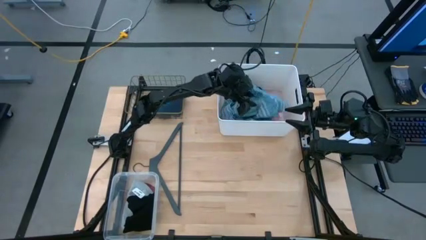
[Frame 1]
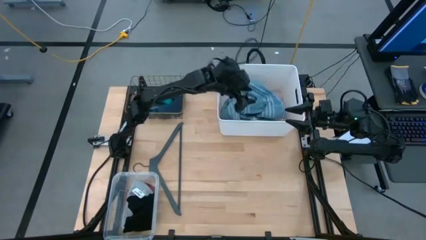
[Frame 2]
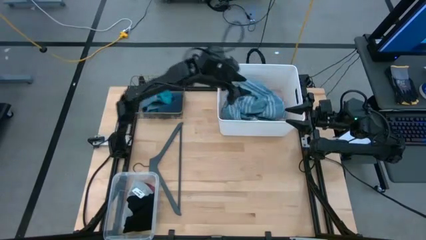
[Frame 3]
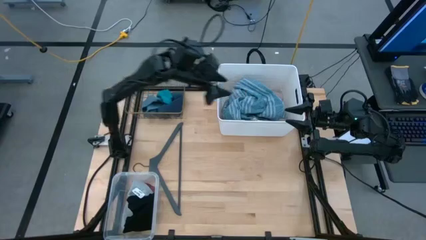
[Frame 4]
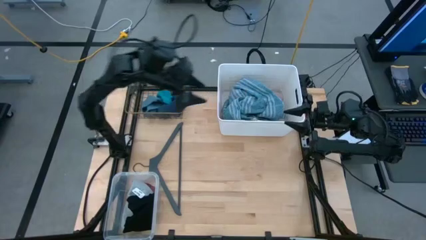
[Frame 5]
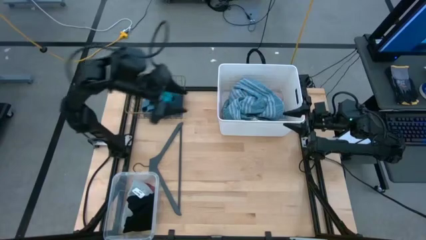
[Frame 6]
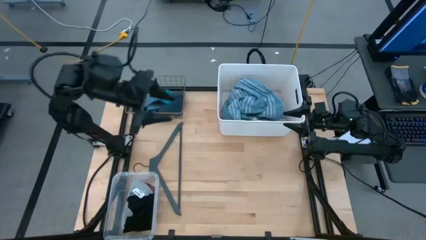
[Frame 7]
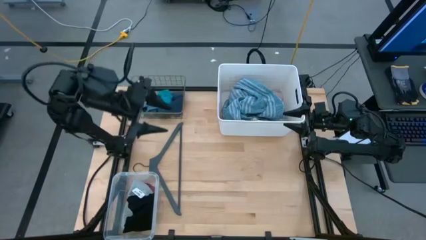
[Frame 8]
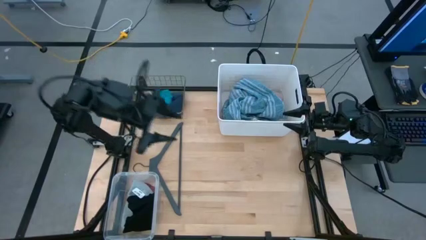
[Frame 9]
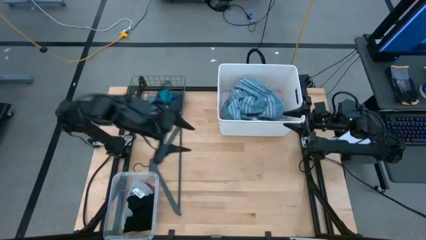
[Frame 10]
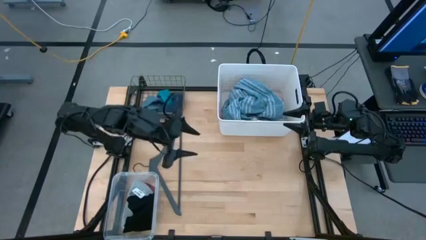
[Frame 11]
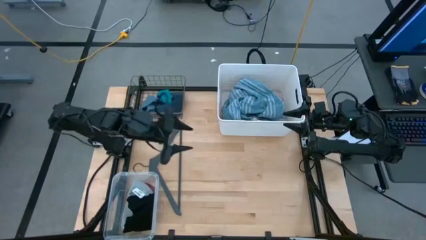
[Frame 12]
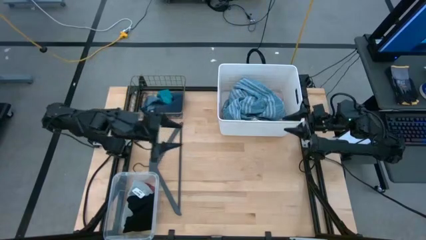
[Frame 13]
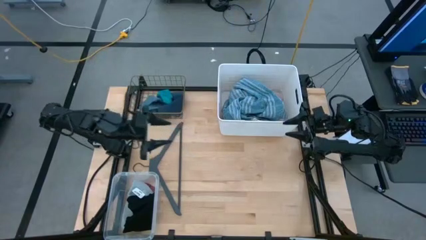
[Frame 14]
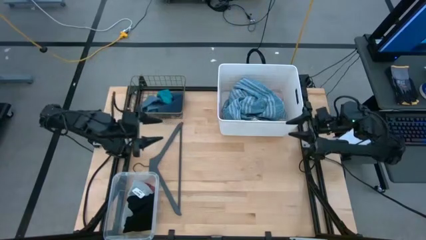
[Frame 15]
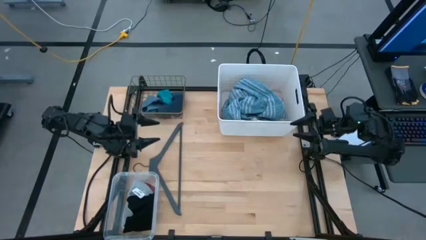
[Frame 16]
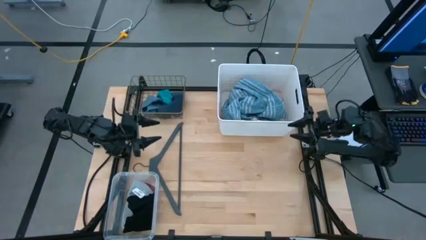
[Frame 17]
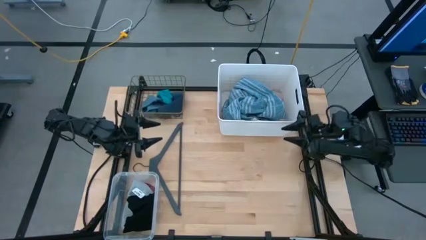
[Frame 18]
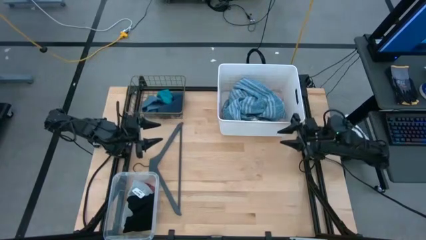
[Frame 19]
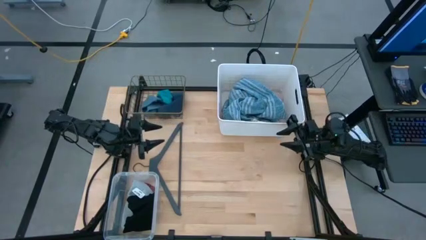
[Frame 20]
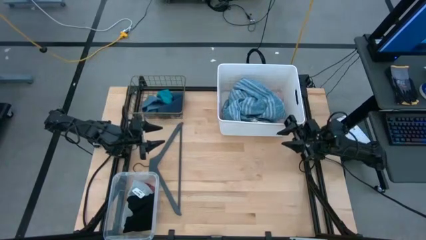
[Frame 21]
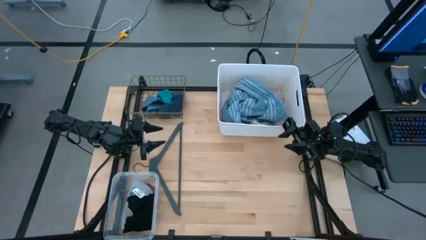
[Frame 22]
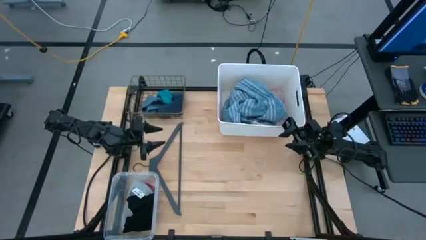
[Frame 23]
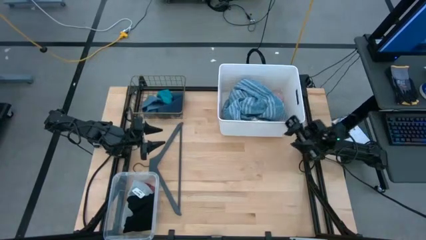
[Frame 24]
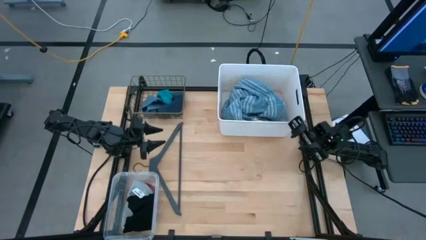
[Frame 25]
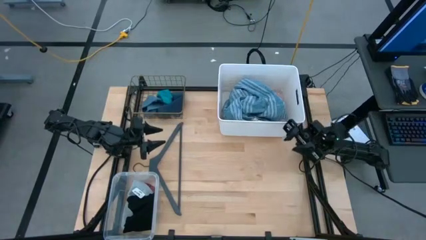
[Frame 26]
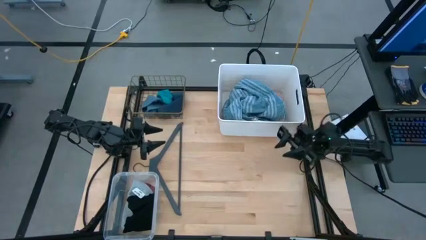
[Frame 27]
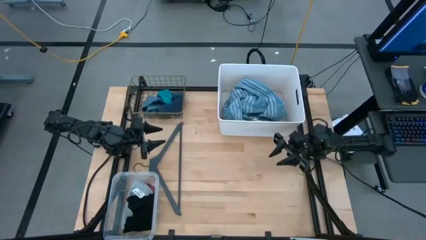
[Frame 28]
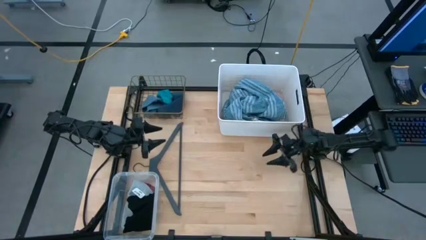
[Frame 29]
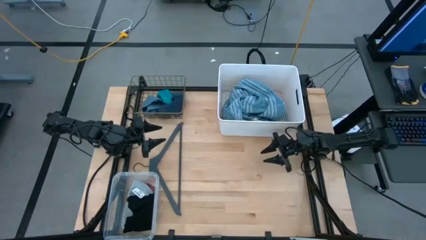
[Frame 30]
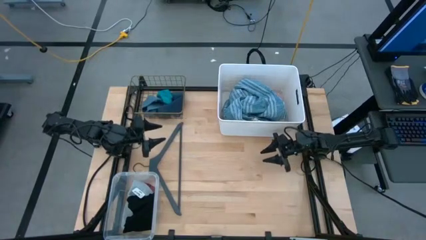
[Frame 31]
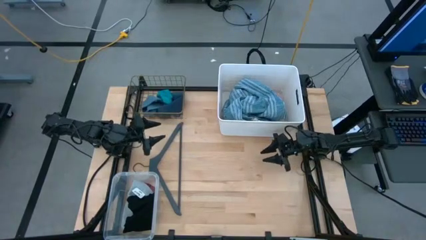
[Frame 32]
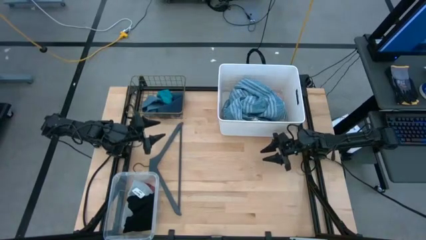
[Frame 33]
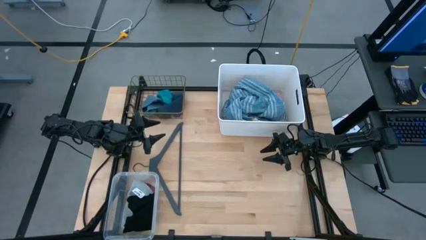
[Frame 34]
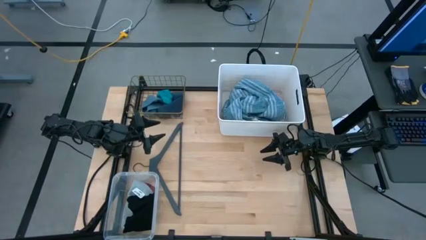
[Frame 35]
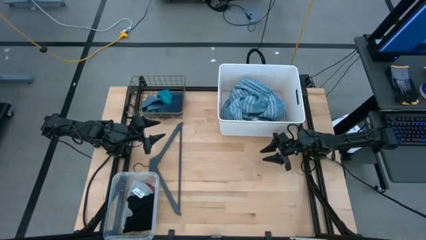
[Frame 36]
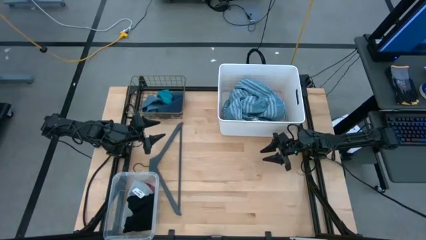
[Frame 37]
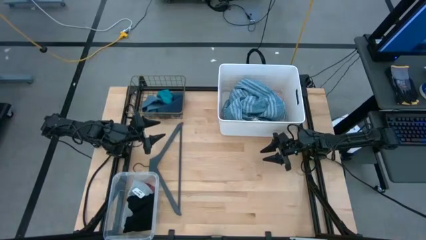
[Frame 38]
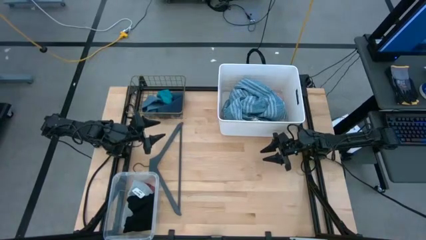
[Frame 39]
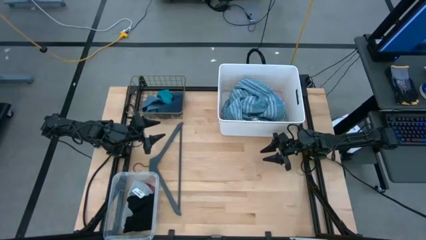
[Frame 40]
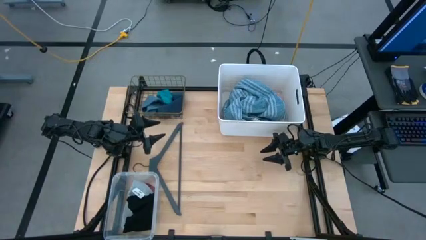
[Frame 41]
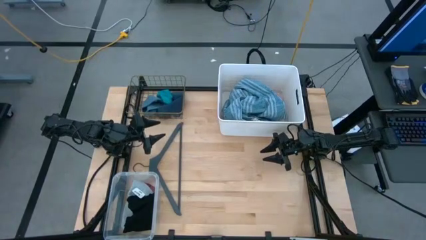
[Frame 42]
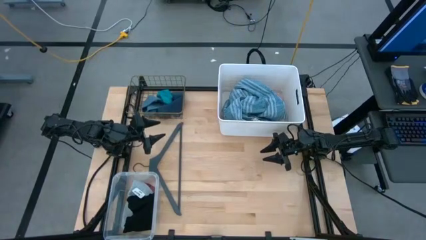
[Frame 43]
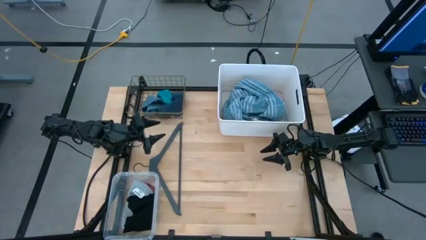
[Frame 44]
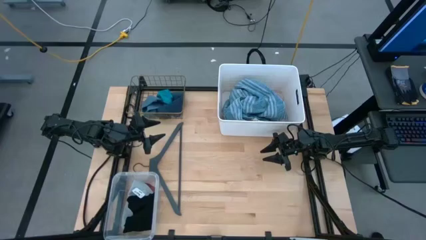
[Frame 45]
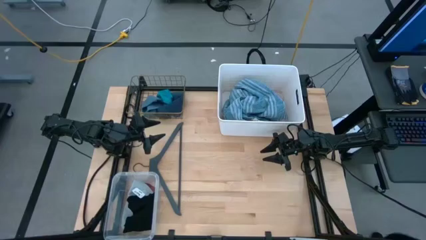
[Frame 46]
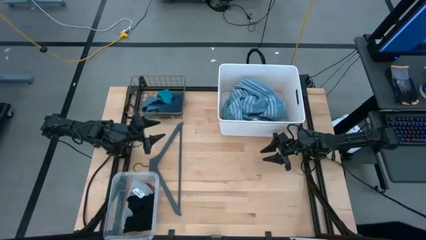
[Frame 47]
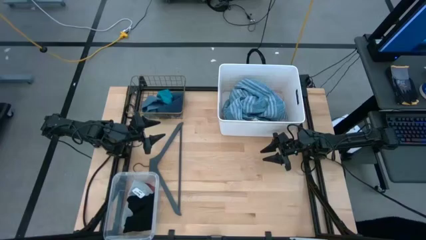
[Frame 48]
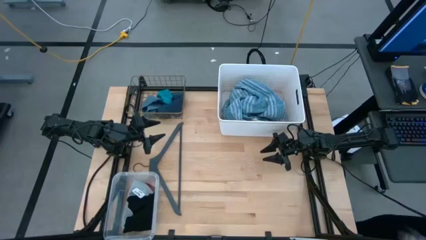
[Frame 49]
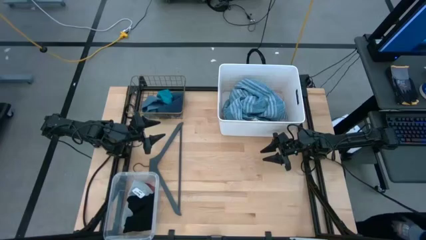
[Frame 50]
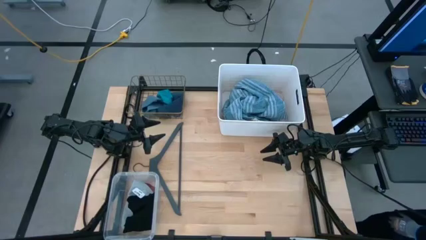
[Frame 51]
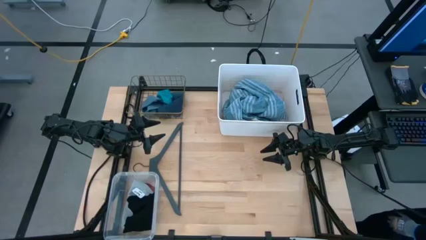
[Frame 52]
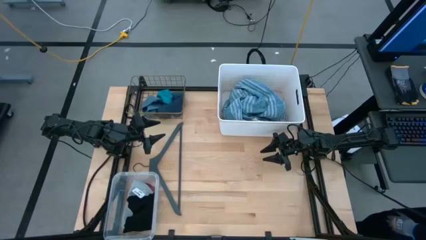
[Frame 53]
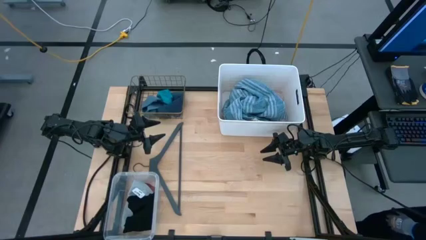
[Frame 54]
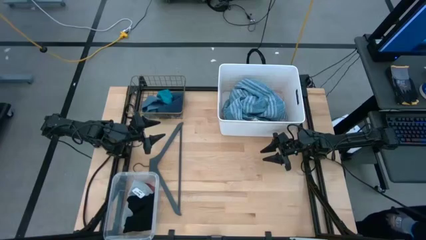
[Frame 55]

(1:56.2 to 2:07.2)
Task: Pick & Place Cloths
Return to Home Position

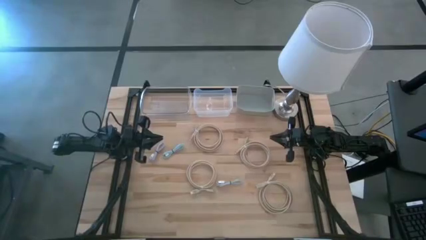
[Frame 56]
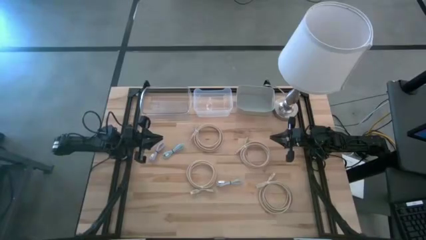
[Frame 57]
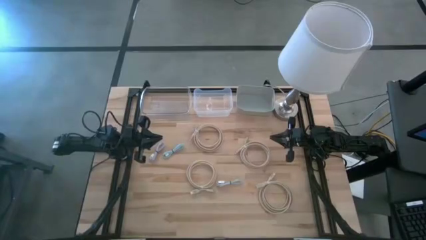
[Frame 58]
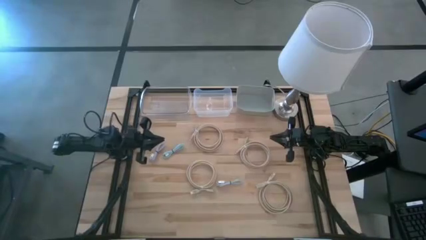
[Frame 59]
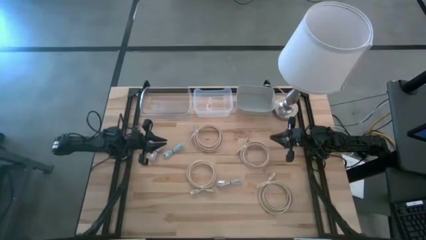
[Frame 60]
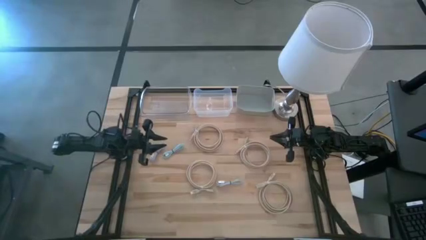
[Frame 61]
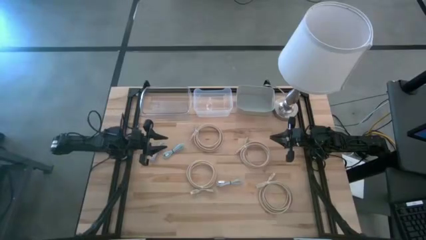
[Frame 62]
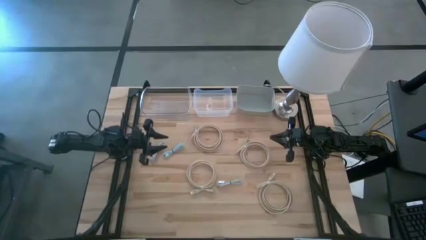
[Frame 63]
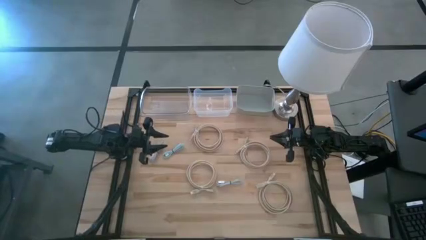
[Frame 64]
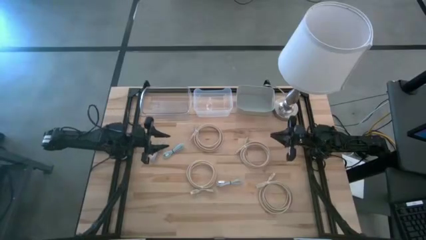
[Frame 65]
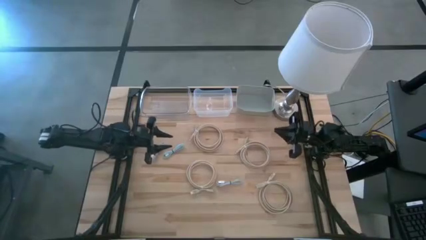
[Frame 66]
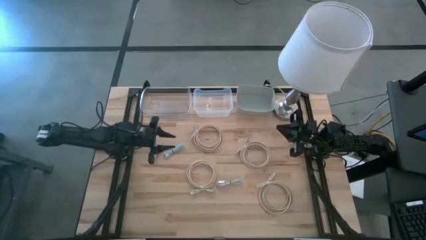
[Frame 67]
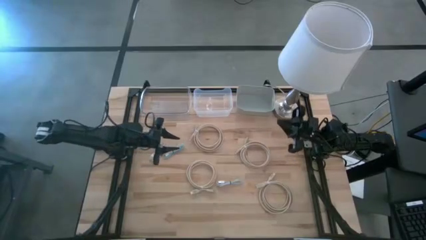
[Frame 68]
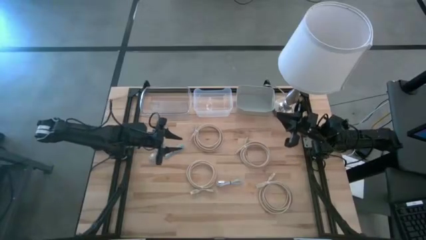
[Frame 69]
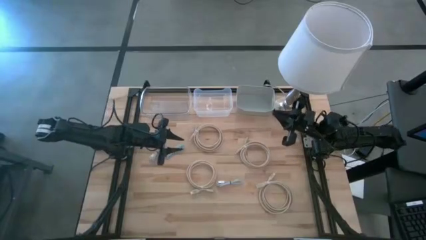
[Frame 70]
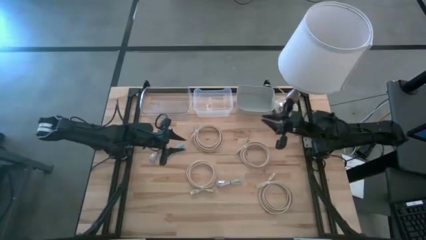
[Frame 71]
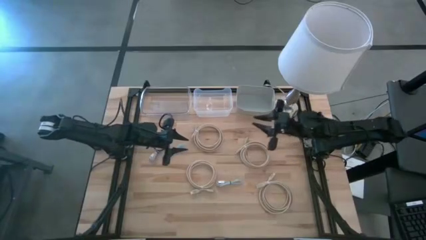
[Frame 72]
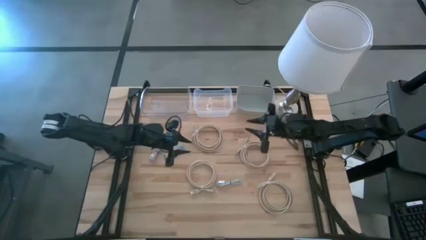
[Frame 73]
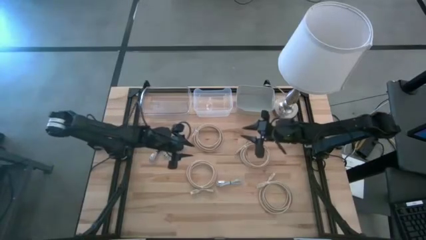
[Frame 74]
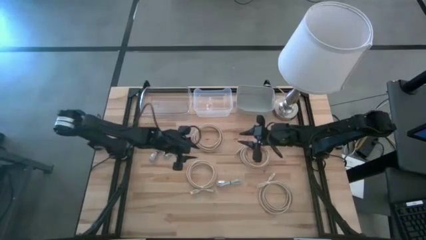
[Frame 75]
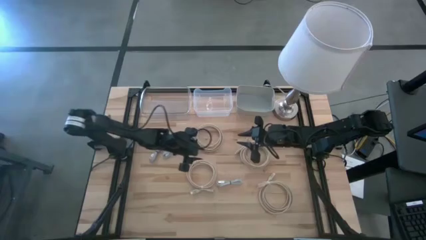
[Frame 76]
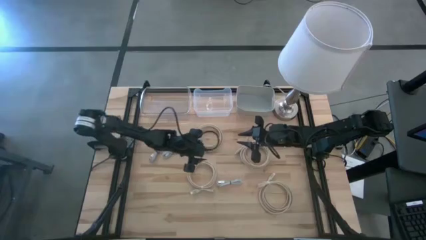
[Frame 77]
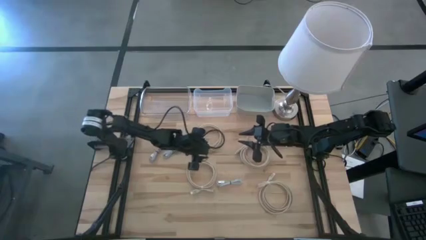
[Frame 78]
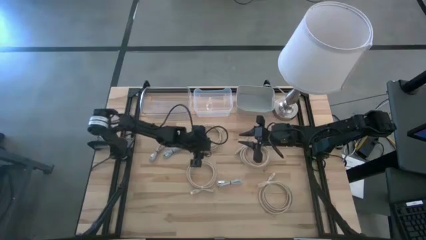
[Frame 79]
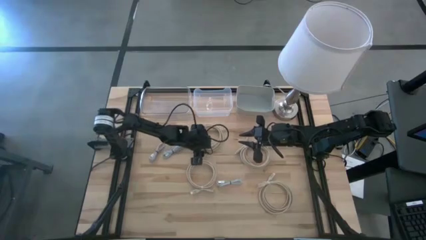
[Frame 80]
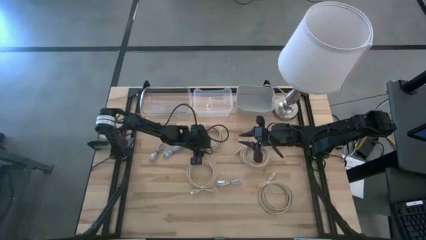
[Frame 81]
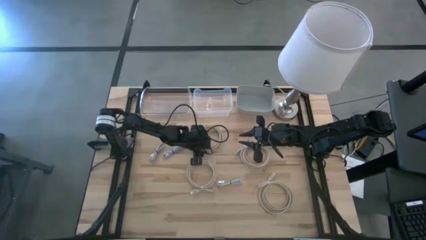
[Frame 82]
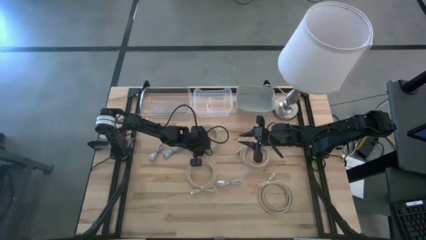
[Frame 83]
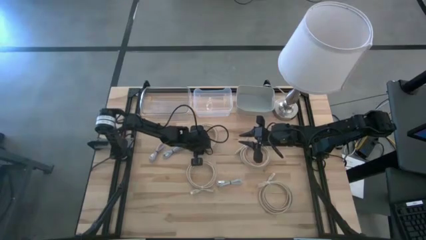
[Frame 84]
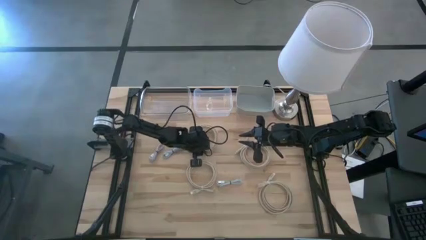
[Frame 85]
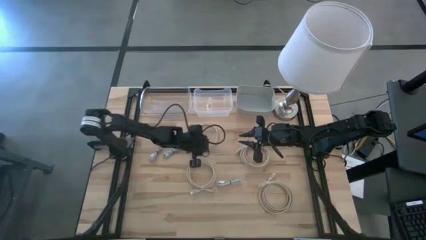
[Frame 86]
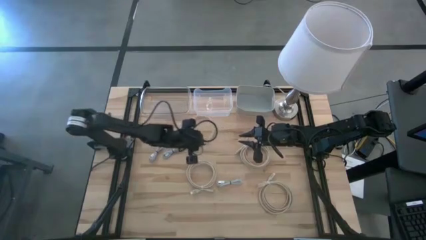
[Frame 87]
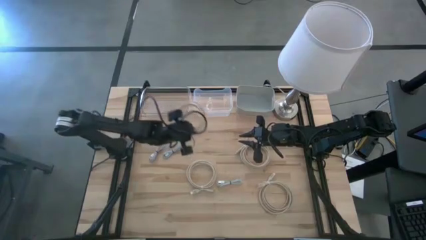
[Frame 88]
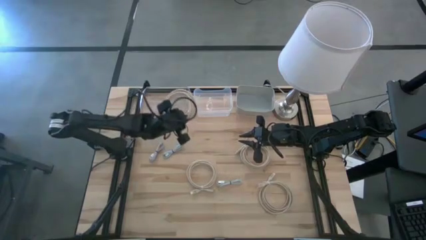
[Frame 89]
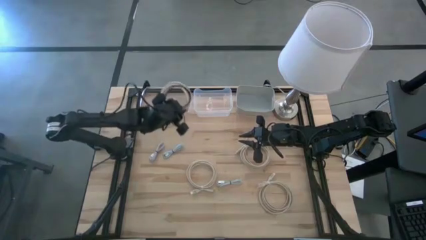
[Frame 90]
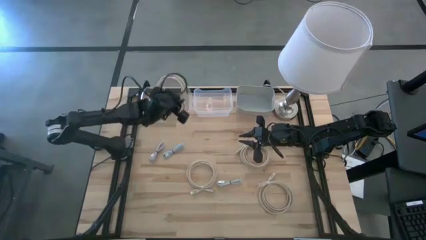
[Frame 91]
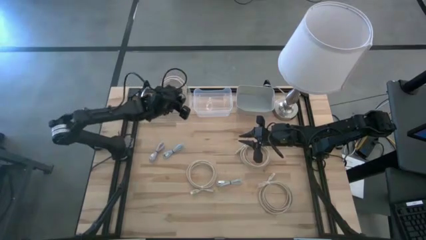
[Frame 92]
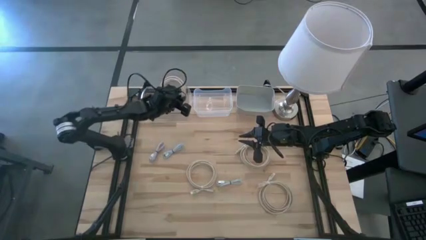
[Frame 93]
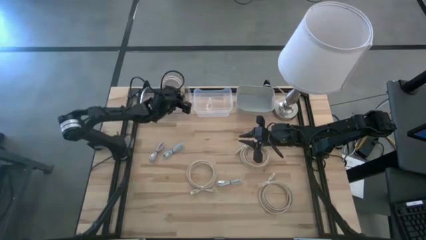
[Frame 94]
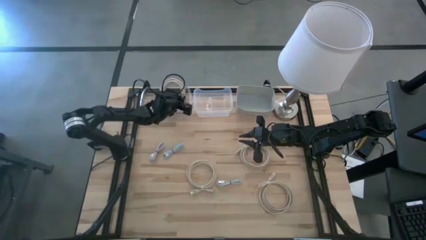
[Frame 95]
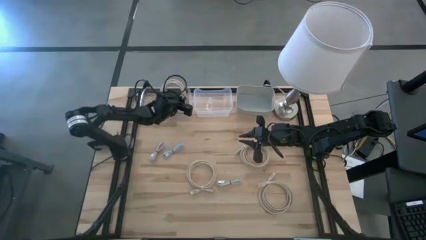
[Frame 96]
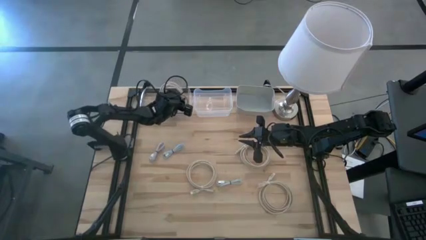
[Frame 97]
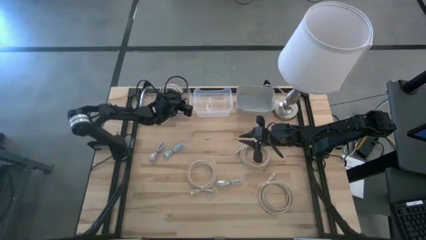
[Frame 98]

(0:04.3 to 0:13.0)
Task: Pick & Place USB Port
Put the brown HDMI cable into the left transparent bin
